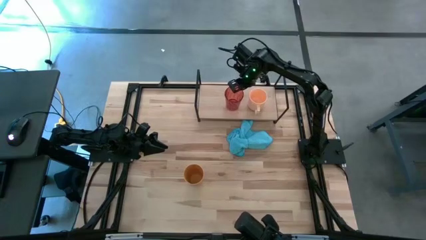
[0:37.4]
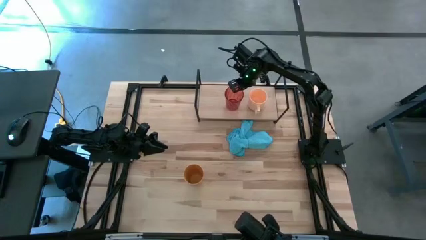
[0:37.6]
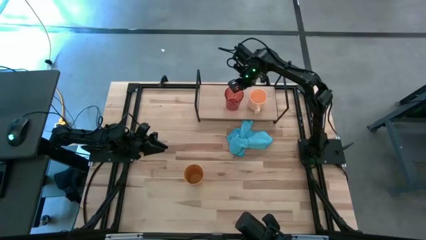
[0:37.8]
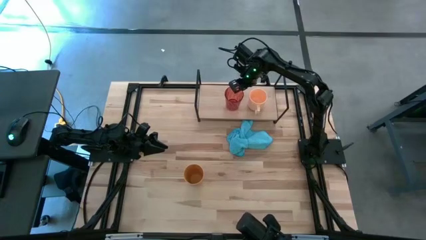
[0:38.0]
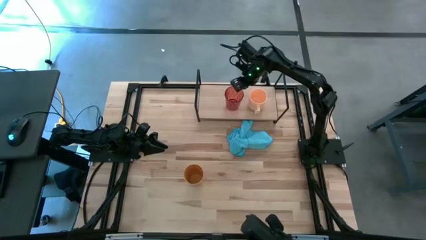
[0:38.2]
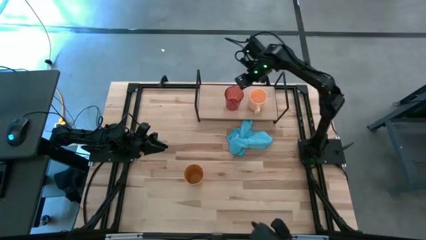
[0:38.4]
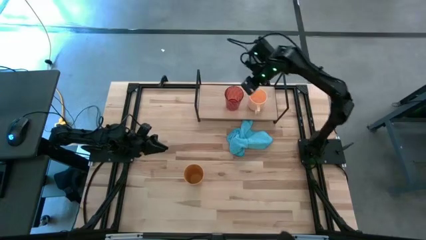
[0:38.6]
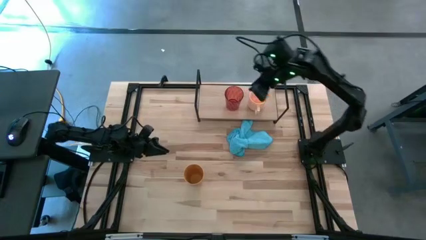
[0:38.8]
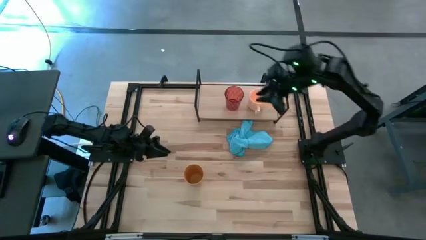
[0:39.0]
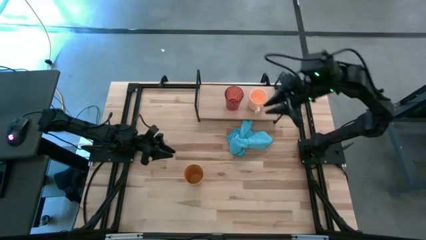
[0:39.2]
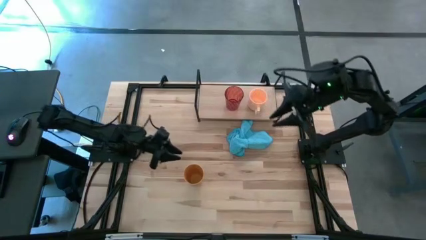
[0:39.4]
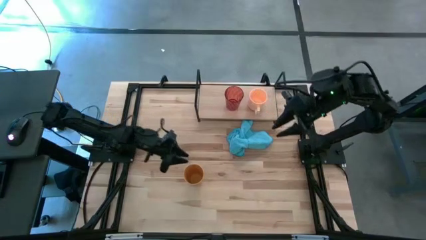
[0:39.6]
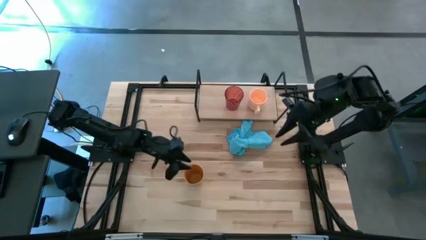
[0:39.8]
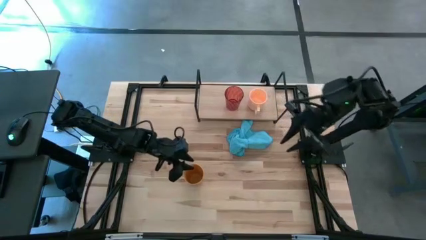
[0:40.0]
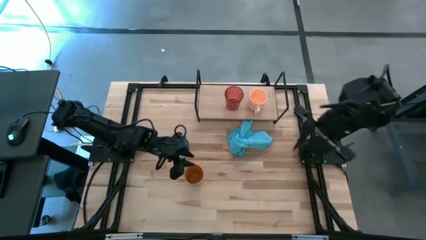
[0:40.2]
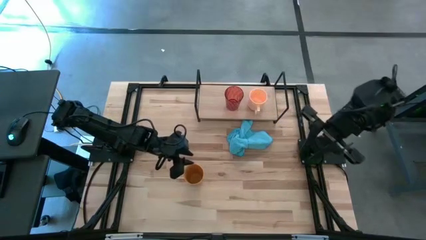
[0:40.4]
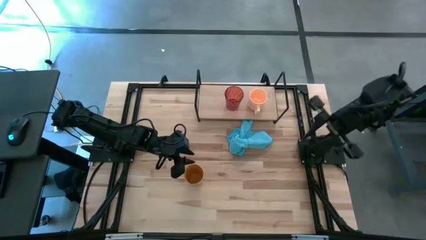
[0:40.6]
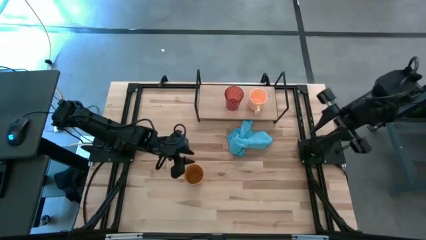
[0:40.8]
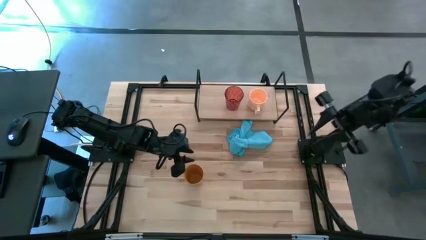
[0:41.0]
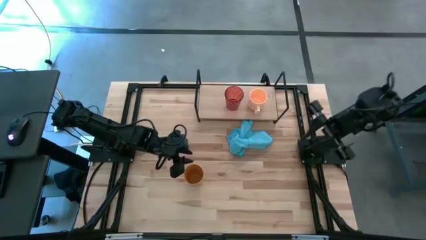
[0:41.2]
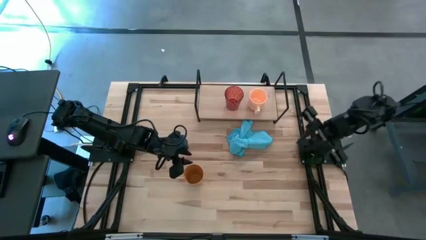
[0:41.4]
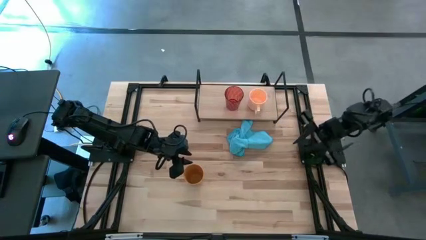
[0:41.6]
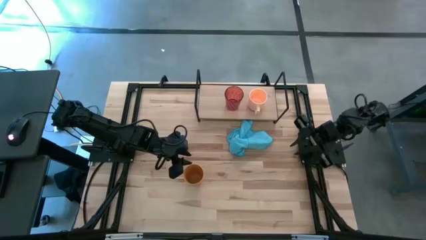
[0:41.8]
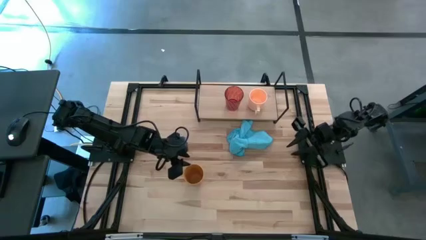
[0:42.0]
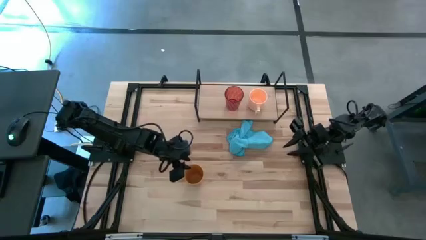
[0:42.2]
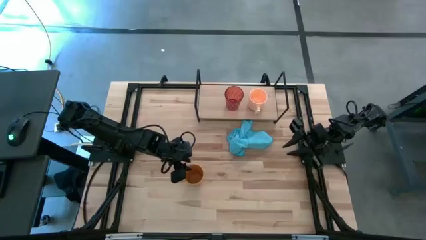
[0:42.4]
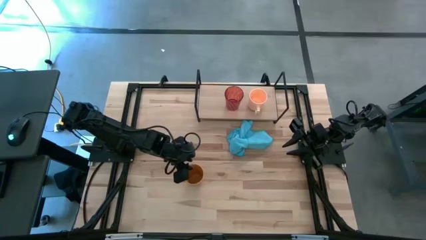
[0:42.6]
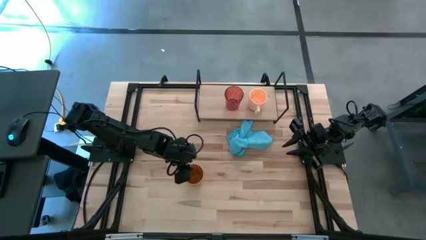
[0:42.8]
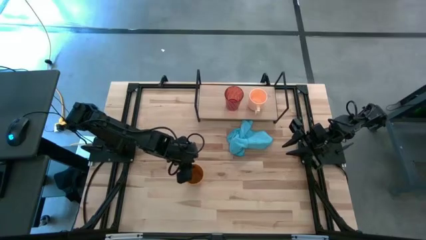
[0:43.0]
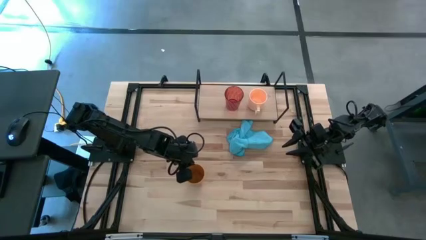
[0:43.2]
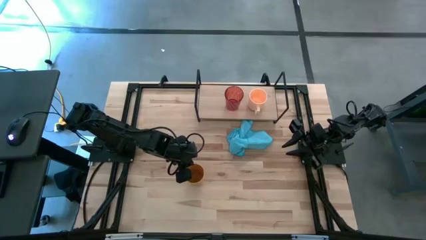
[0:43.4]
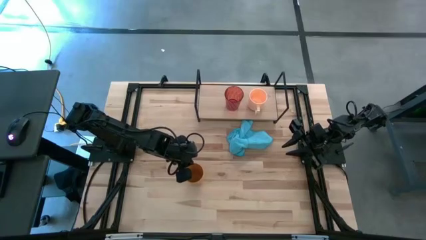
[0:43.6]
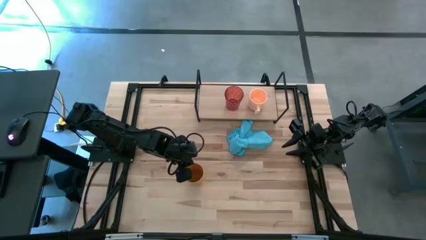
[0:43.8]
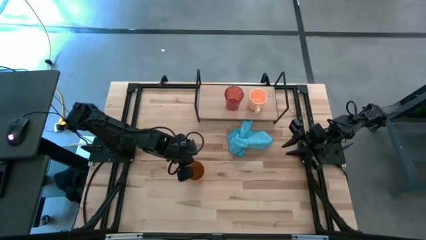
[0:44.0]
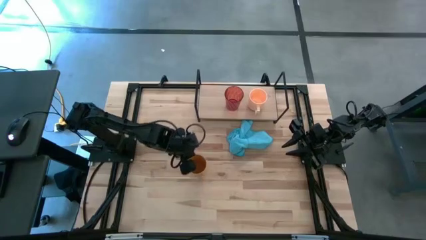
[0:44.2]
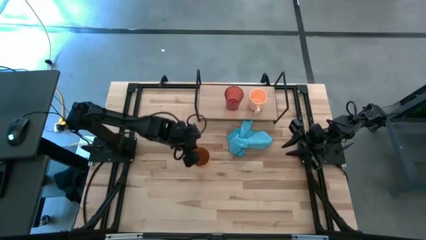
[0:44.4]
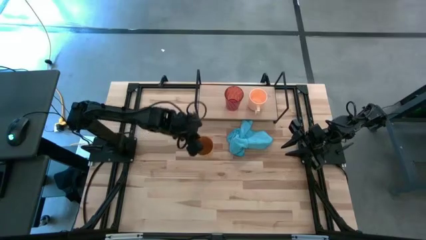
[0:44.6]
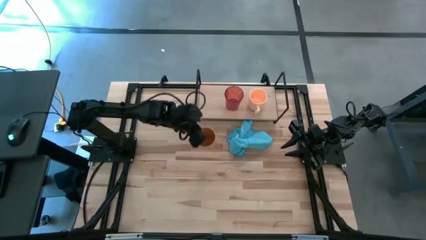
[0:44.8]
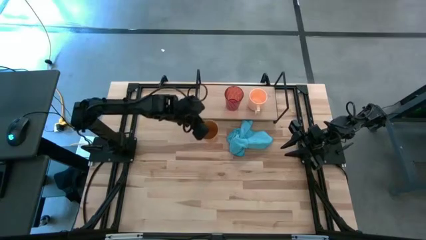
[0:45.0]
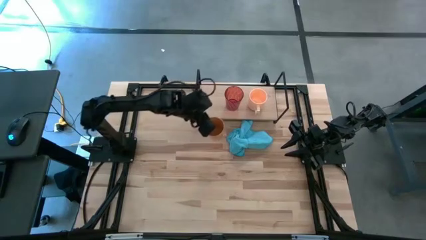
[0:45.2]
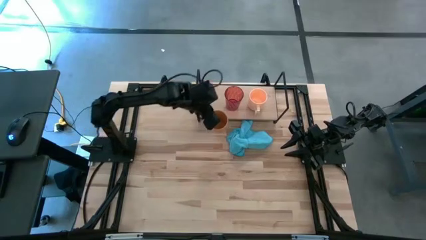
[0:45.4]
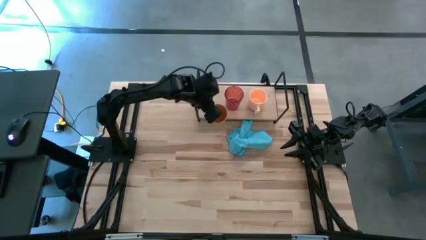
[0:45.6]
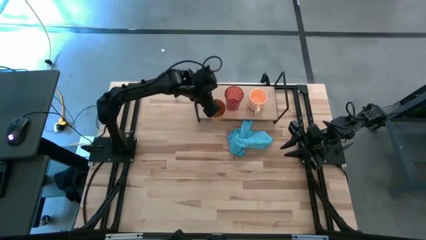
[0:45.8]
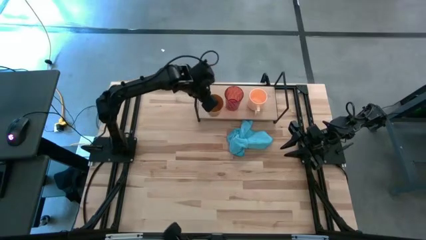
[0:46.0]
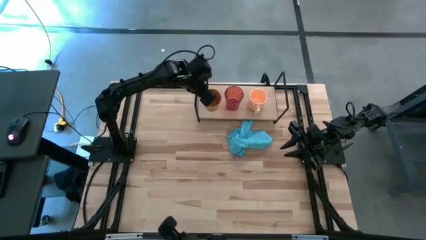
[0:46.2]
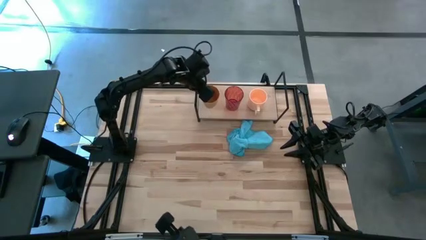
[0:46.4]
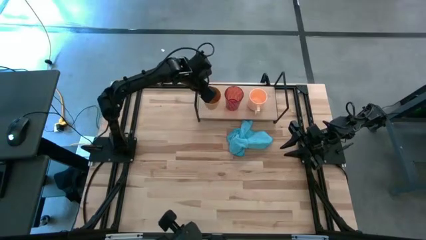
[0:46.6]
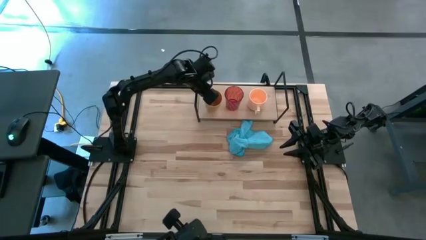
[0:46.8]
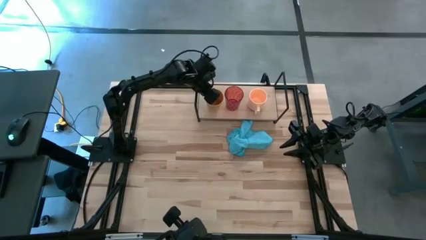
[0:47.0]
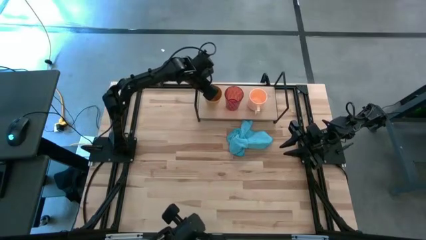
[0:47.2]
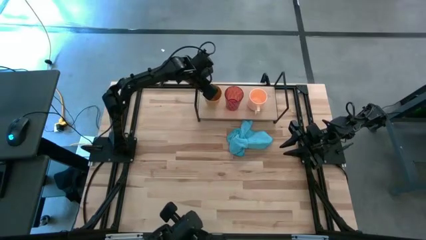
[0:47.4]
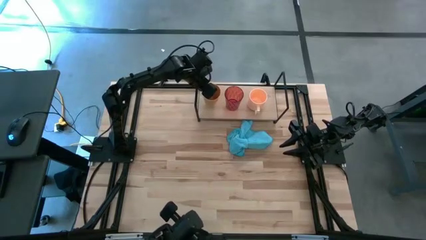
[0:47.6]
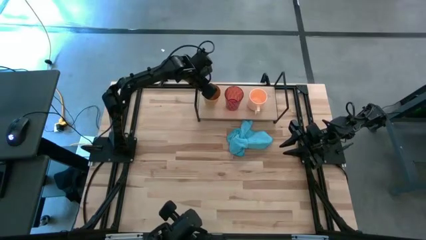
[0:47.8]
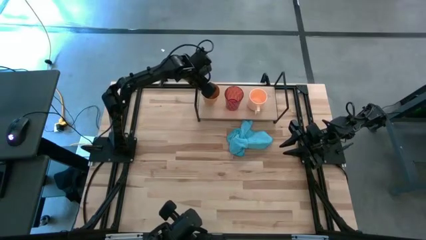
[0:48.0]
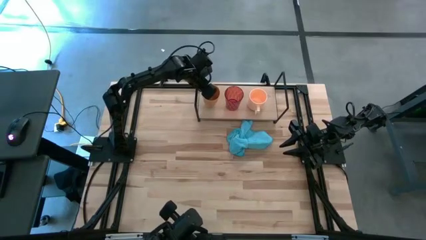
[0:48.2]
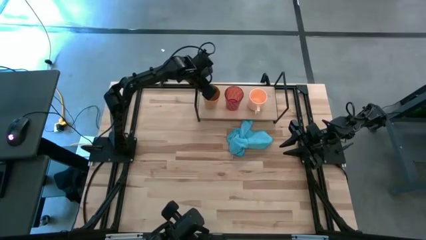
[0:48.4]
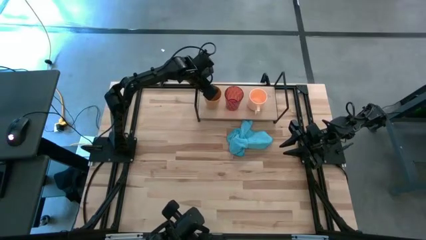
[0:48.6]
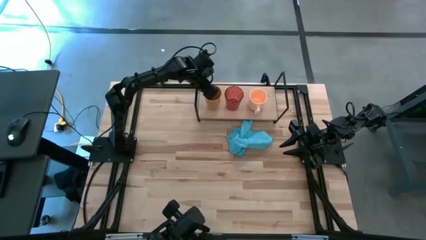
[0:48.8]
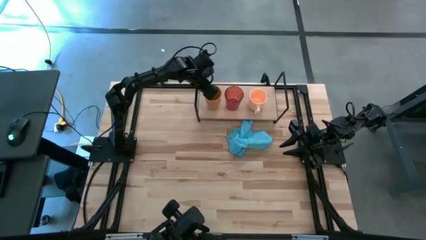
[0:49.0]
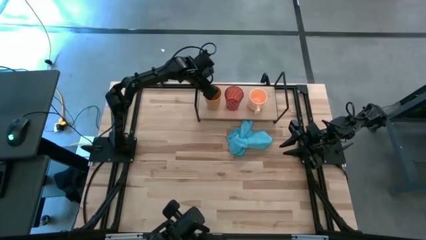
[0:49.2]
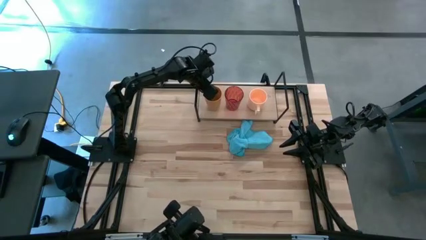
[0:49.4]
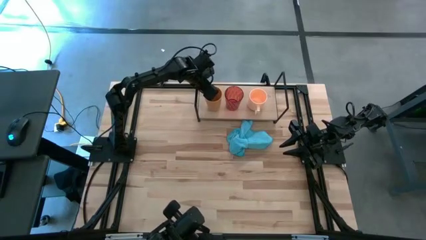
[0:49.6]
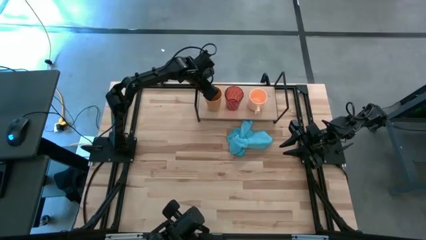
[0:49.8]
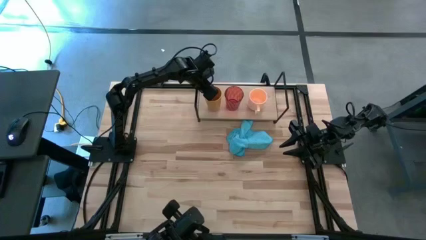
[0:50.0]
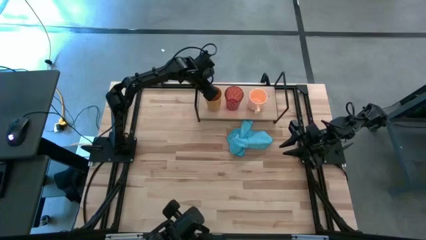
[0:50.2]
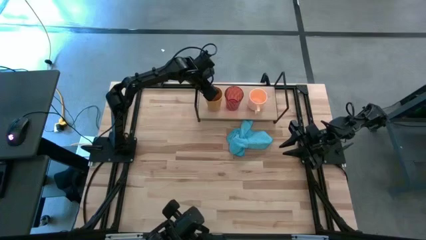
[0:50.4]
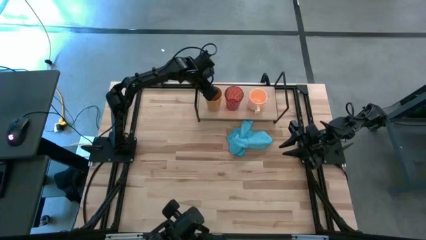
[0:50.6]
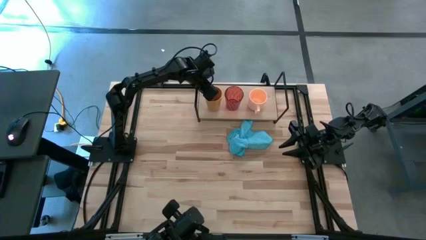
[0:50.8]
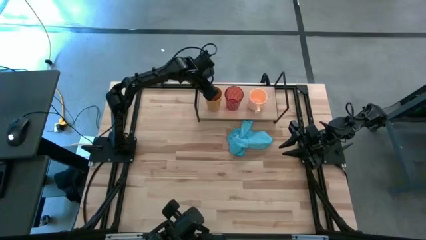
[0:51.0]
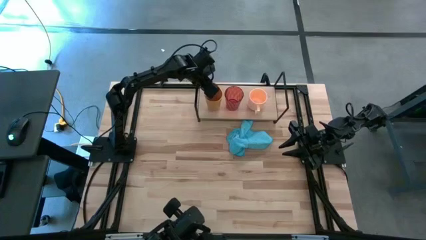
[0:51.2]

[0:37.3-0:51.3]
Task: Stack small to large cups/mugs on shelf
Put the yellow cup on the shelf
